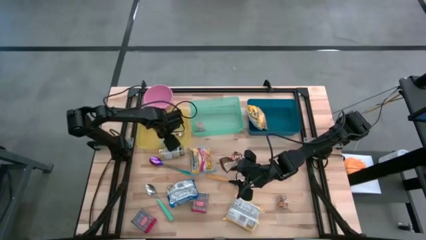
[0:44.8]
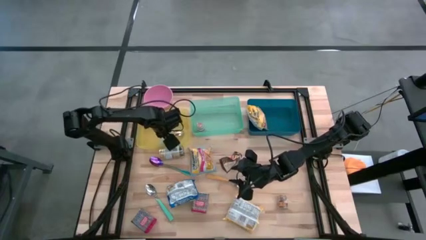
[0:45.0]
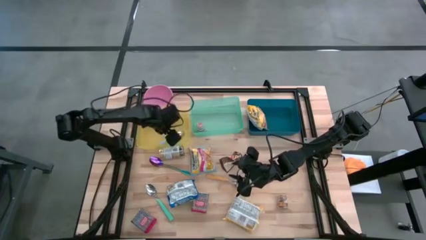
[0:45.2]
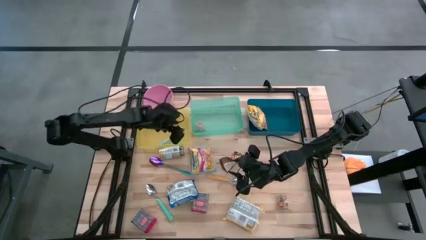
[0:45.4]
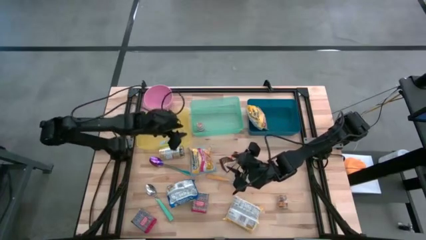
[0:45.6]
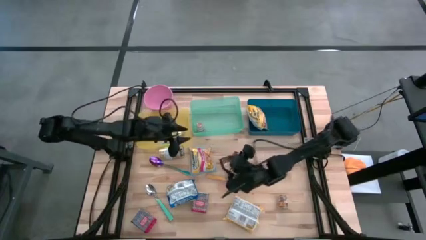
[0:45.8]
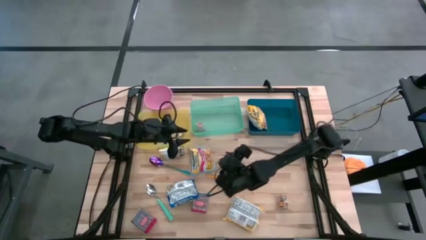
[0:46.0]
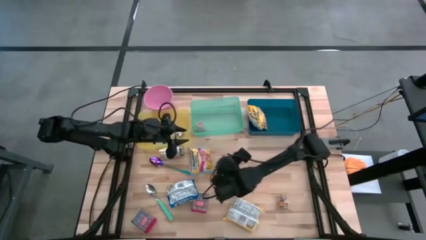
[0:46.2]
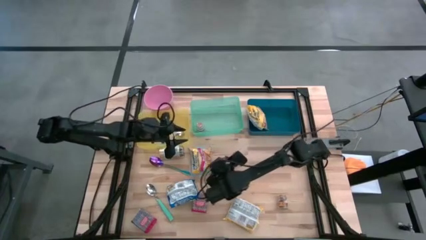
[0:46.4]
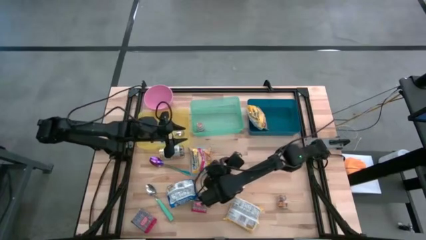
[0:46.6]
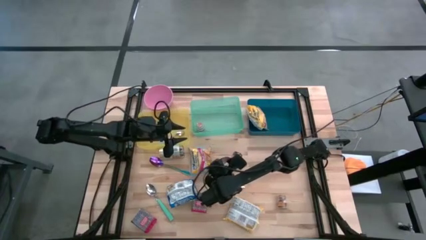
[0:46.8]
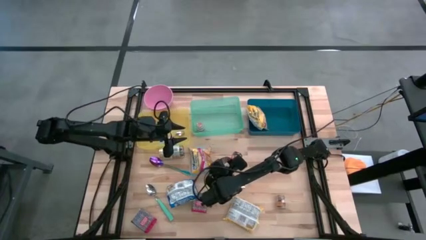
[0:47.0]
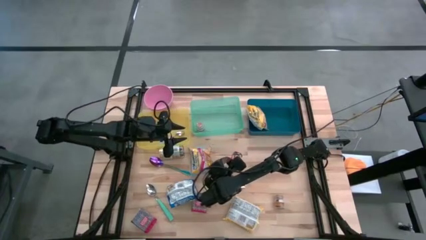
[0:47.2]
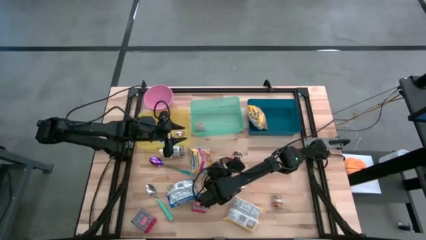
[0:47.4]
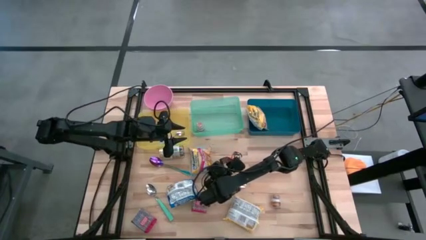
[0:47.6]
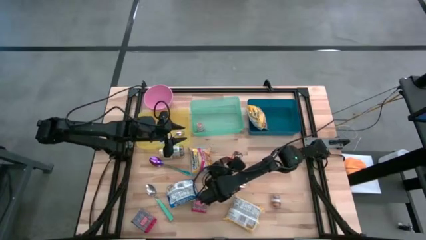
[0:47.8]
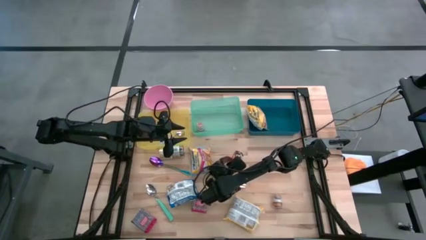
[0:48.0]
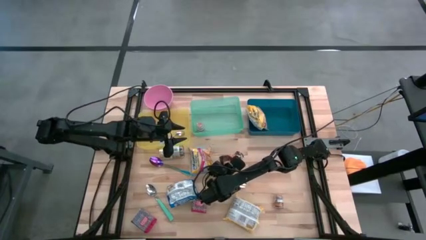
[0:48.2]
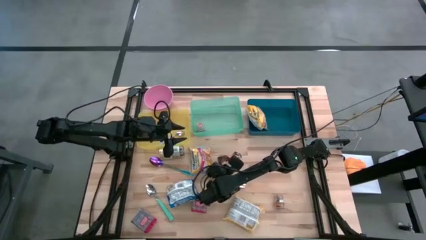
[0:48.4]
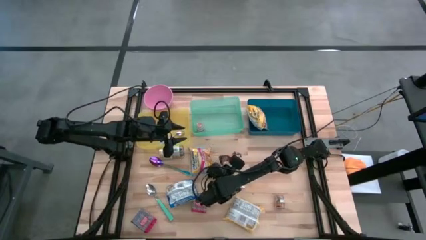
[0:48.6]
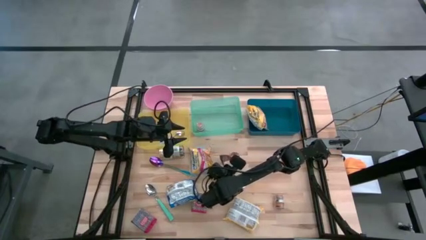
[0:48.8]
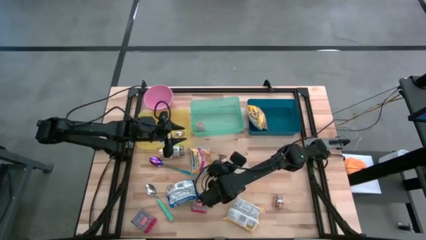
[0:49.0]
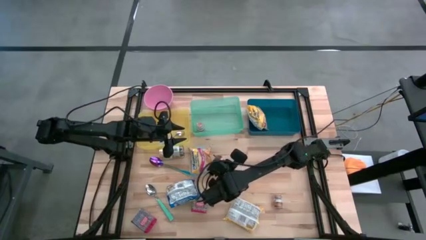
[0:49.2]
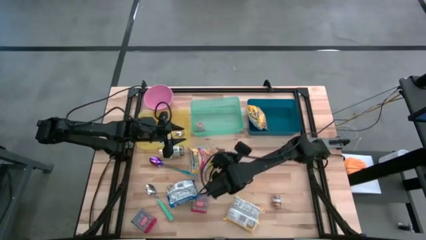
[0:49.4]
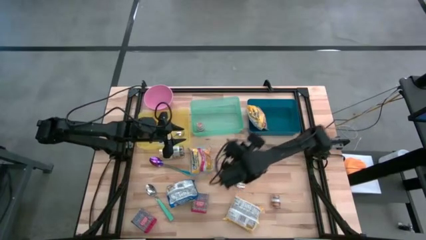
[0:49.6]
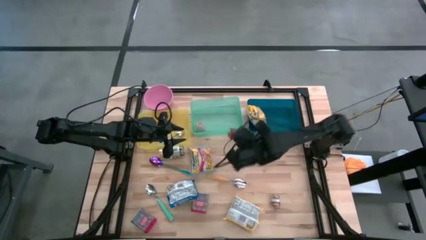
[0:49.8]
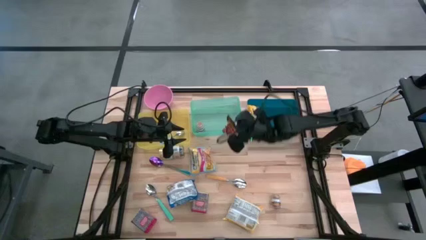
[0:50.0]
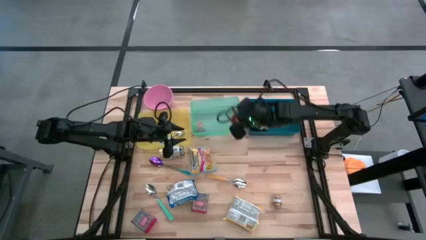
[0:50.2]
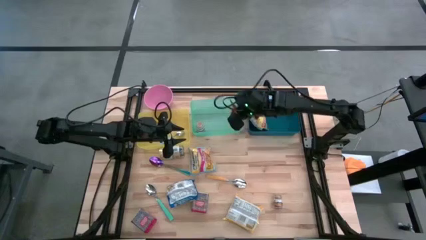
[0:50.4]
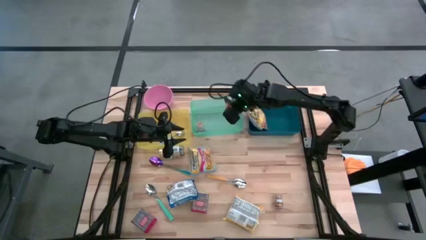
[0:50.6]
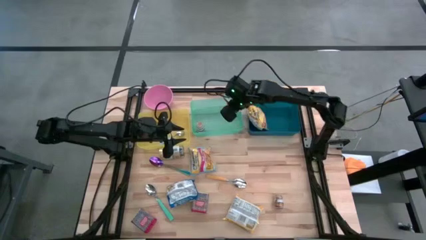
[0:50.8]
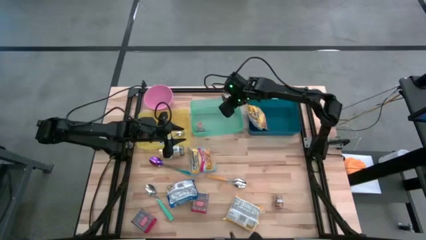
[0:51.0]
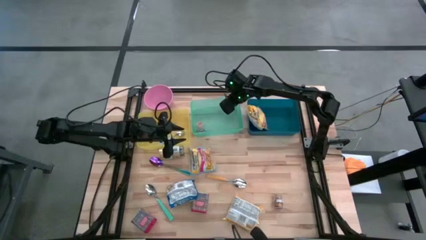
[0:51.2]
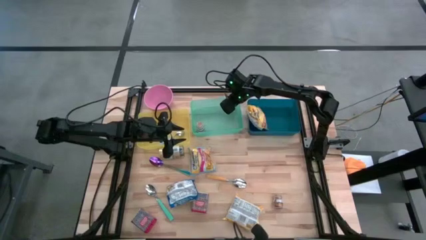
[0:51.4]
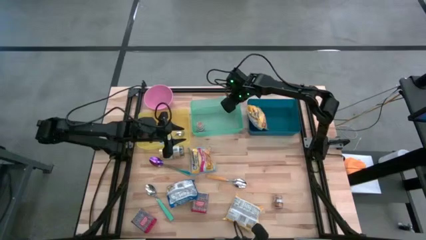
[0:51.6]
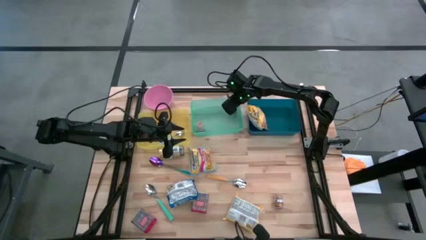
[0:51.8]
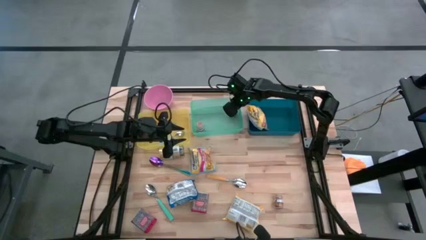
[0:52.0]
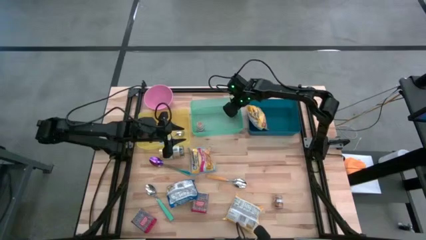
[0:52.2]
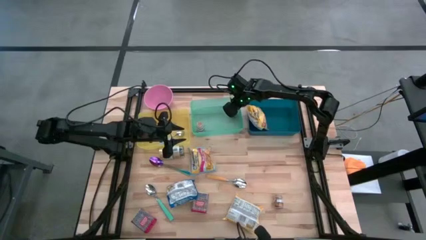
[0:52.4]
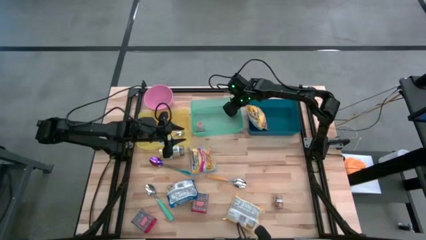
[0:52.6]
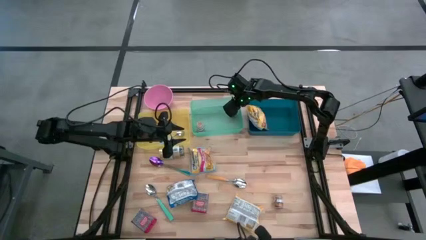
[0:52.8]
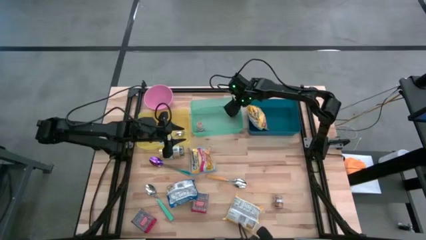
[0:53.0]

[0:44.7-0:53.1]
Put the seasoning bag into the green bin

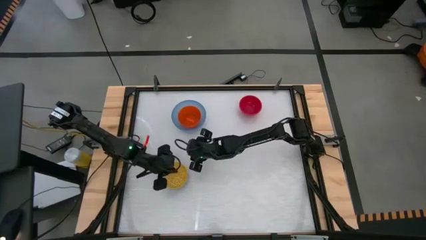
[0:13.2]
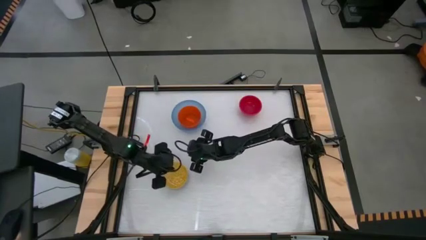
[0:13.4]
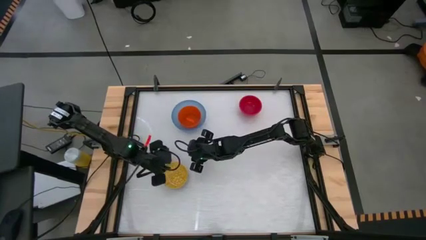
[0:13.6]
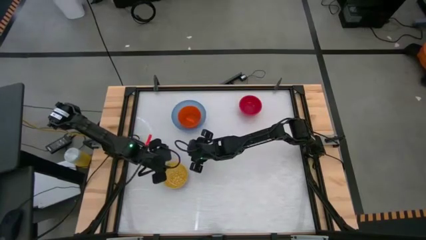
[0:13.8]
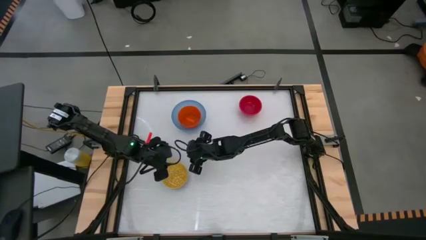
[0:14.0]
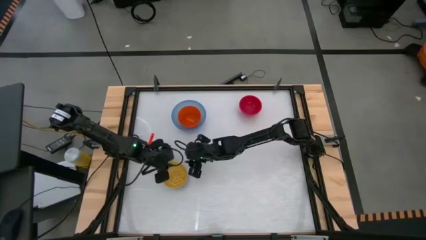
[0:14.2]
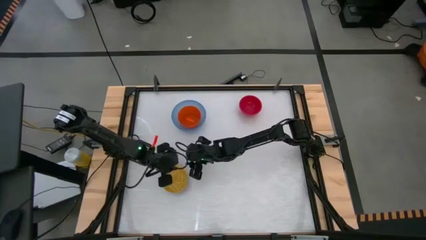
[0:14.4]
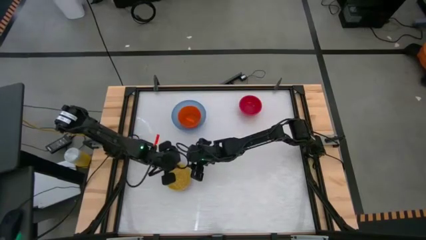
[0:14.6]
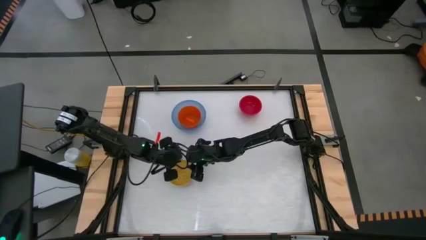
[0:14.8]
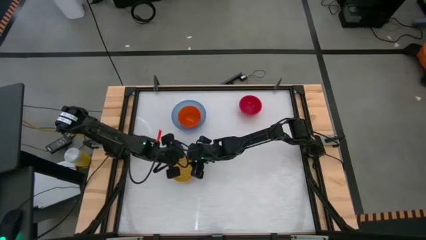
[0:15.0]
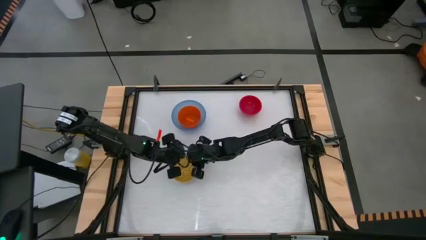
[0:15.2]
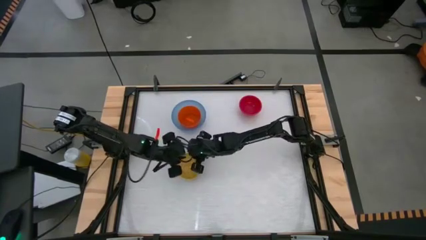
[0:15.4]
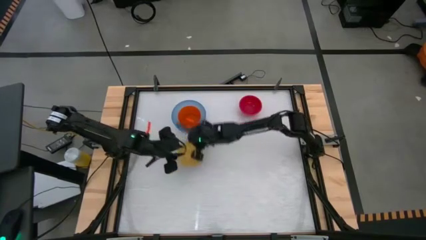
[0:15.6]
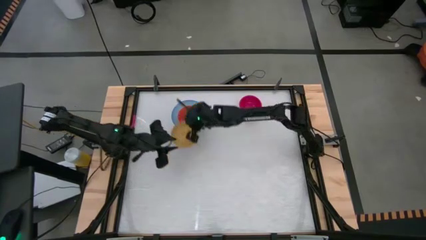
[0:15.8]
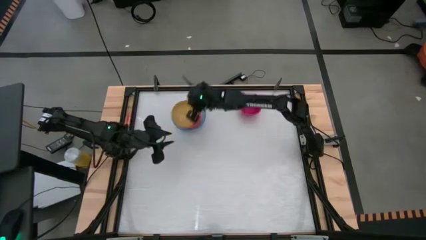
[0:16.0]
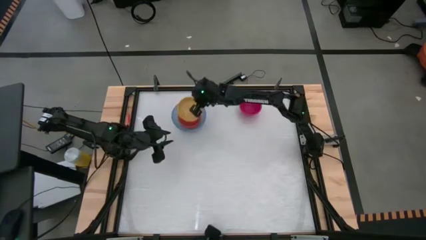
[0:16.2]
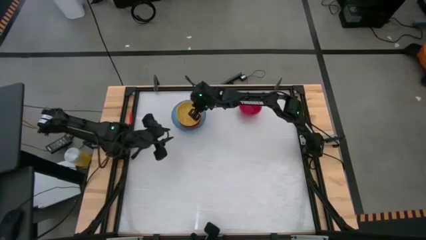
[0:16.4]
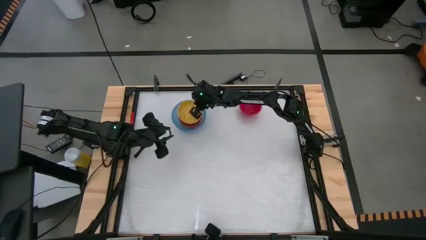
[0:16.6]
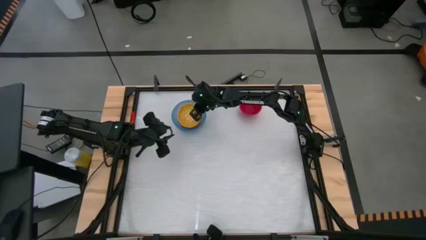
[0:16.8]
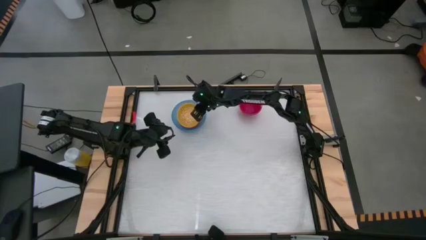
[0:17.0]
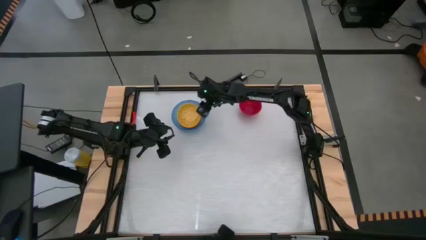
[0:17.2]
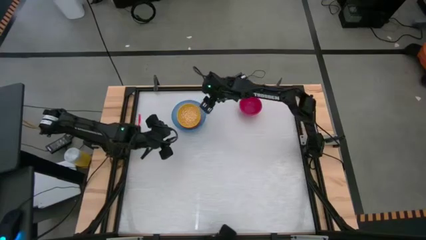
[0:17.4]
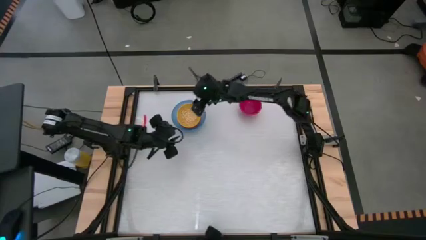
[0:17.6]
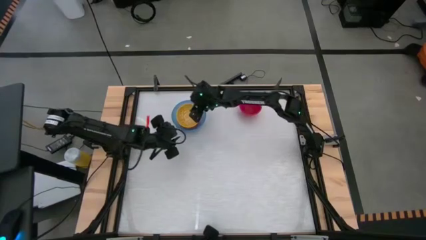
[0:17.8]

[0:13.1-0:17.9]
Stack the yellow bowl onto the orange bowl

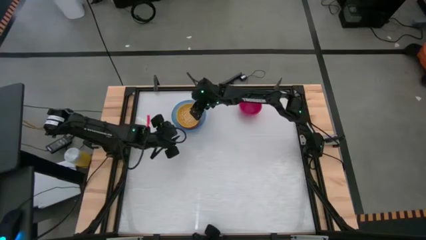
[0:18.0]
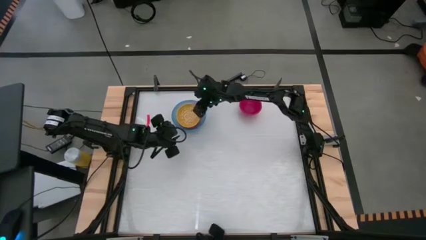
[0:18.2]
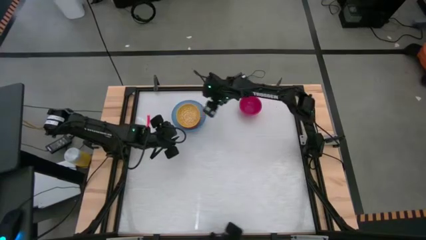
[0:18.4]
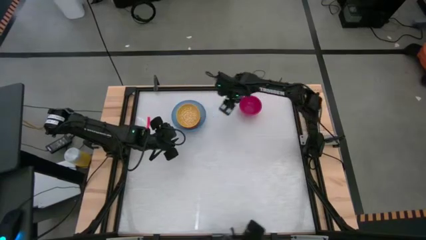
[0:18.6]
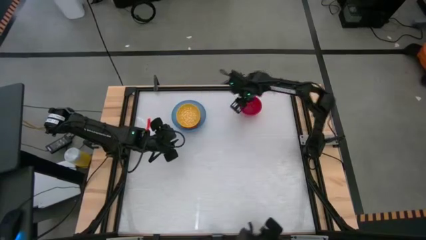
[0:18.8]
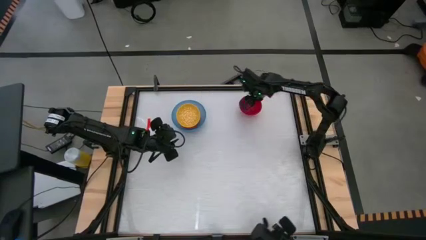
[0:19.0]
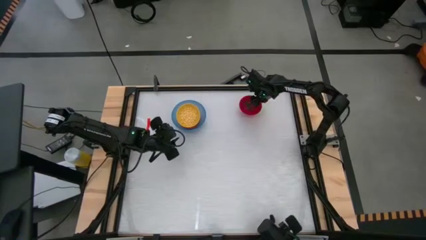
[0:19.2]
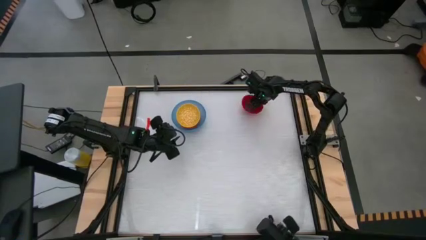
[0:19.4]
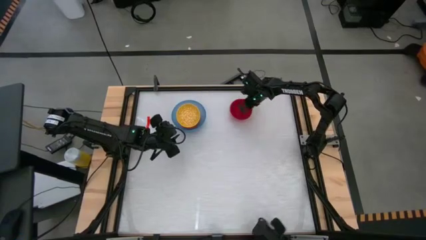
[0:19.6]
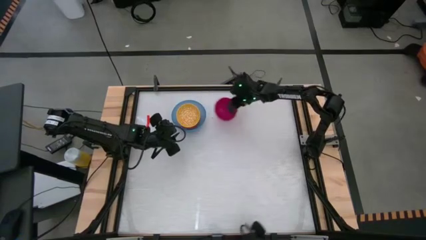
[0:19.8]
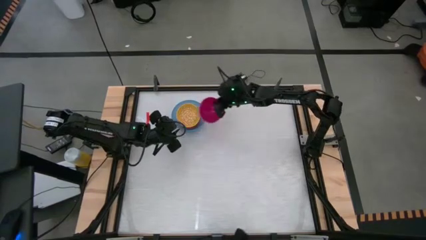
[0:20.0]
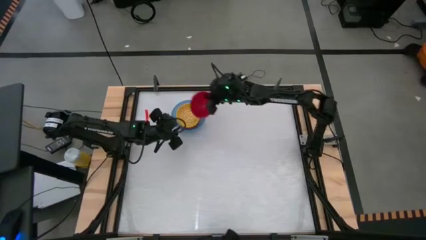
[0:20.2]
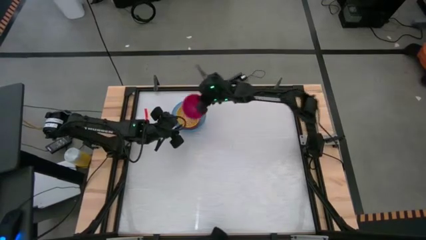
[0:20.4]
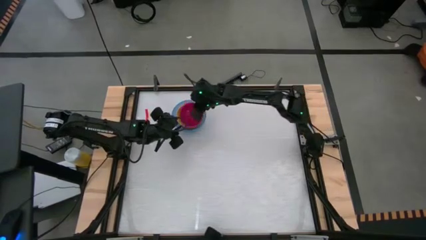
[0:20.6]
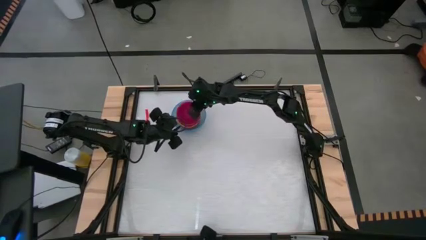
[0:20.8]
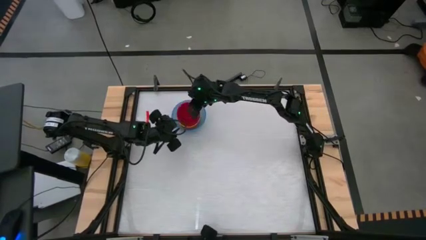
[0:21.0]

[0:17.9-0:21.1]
Stack the red bowl onto the yellow bowl
